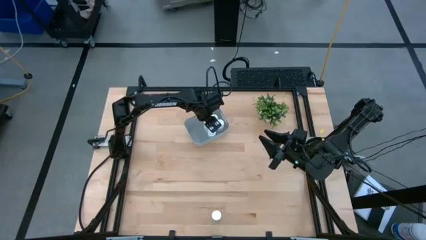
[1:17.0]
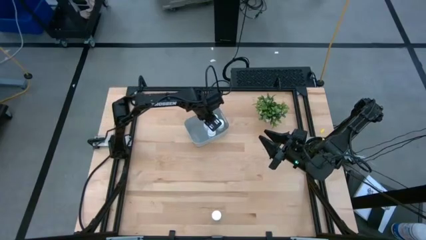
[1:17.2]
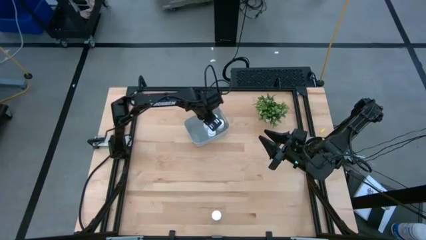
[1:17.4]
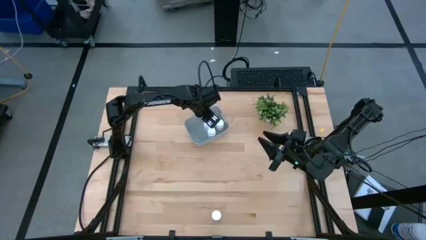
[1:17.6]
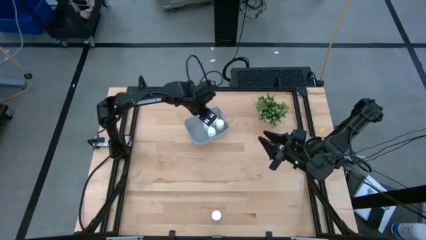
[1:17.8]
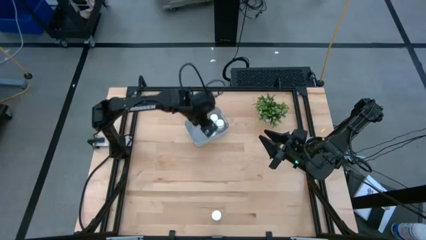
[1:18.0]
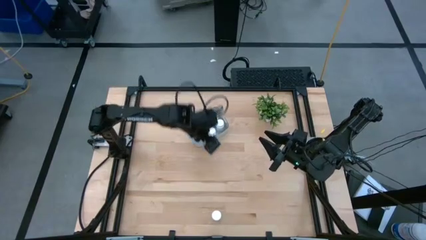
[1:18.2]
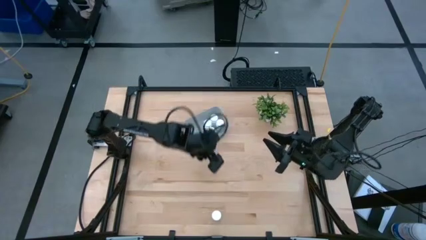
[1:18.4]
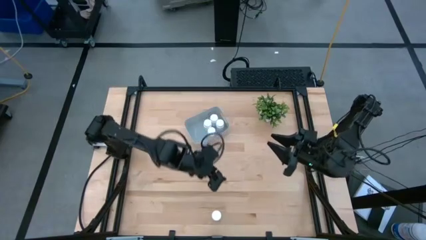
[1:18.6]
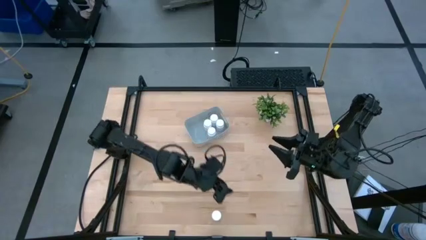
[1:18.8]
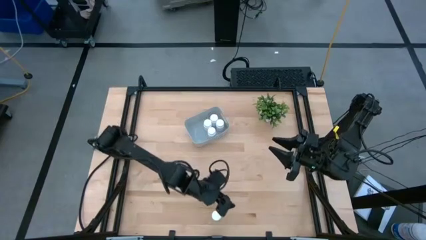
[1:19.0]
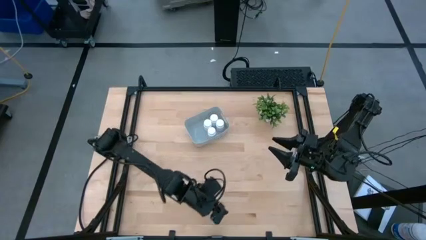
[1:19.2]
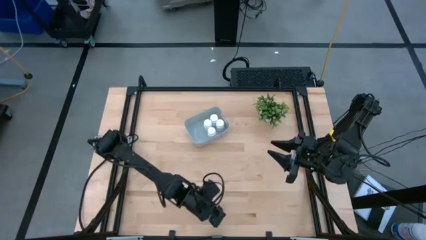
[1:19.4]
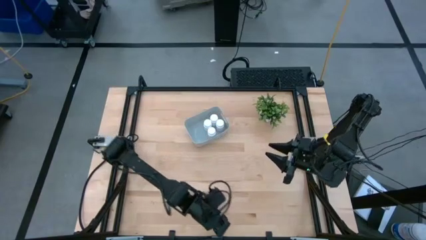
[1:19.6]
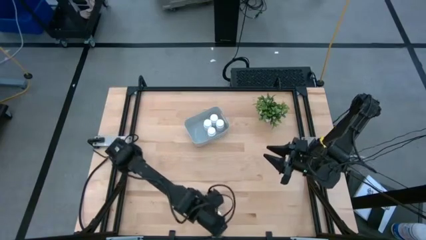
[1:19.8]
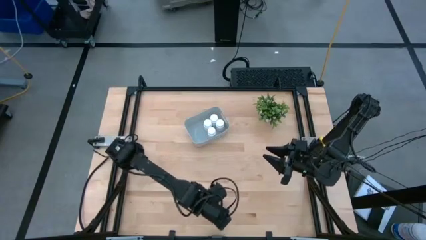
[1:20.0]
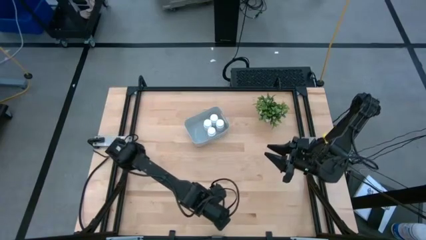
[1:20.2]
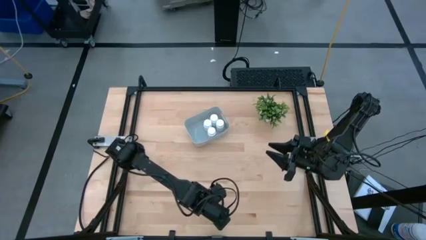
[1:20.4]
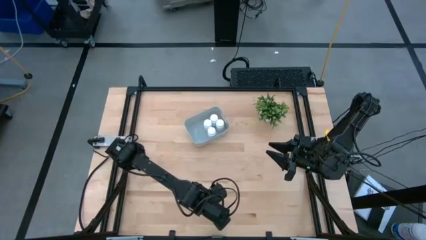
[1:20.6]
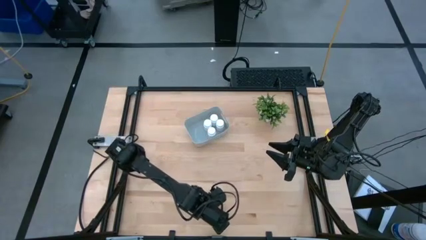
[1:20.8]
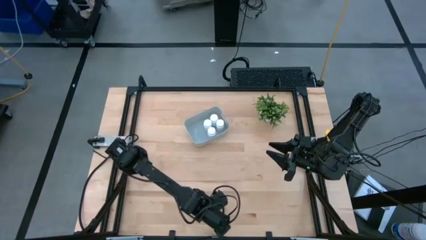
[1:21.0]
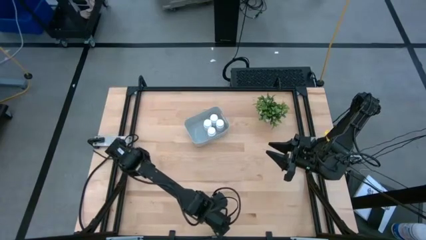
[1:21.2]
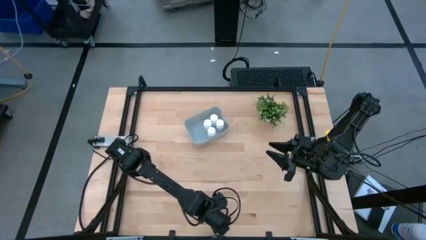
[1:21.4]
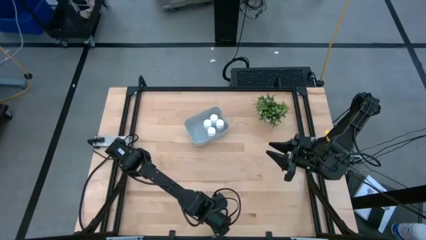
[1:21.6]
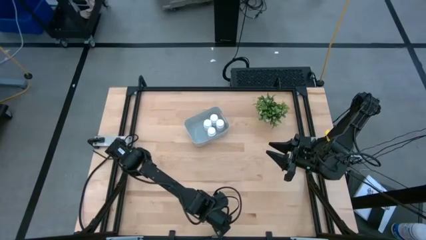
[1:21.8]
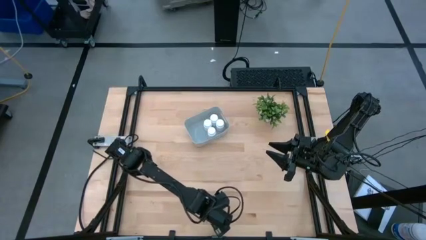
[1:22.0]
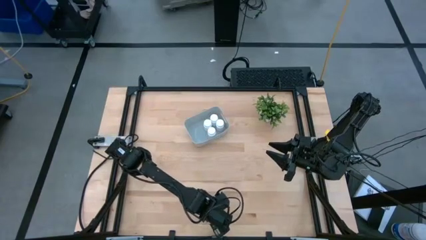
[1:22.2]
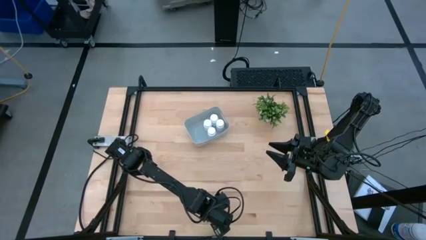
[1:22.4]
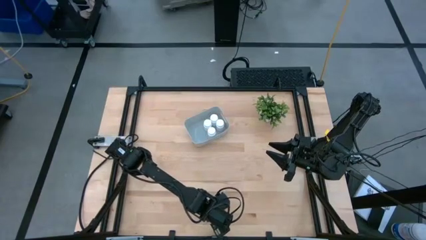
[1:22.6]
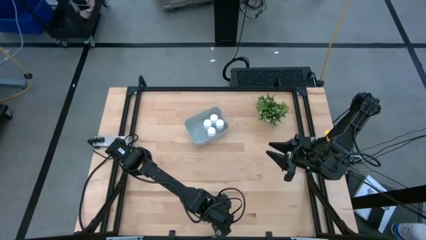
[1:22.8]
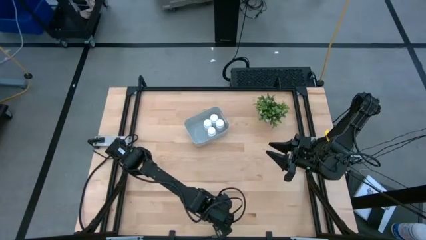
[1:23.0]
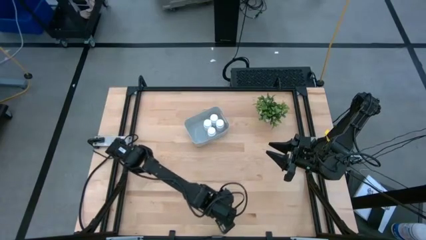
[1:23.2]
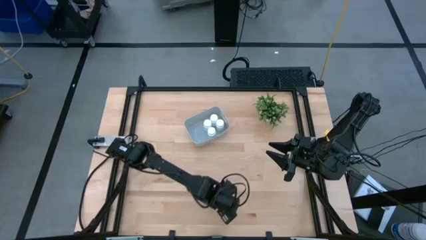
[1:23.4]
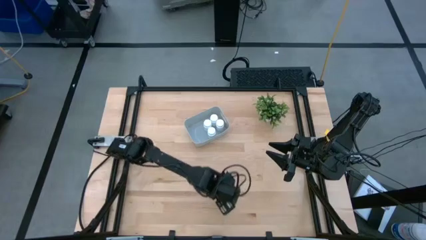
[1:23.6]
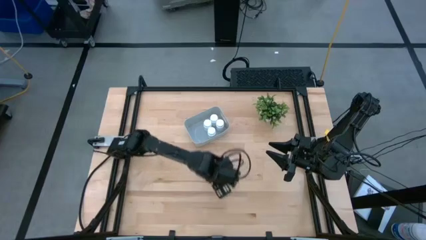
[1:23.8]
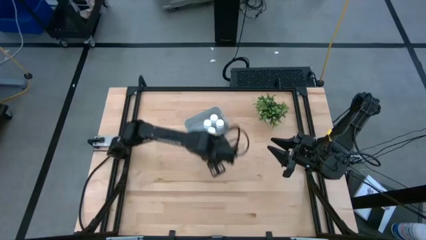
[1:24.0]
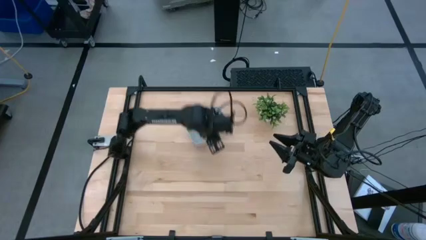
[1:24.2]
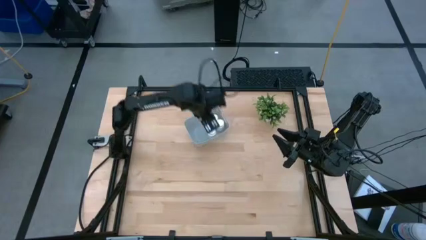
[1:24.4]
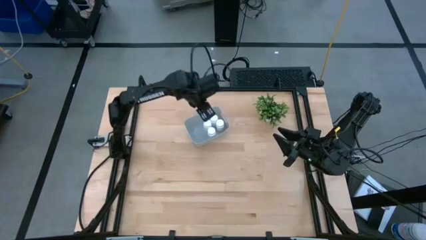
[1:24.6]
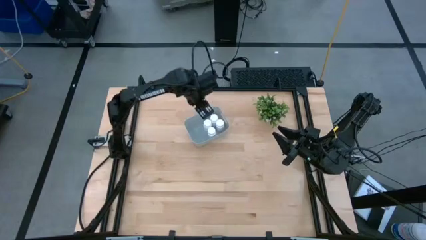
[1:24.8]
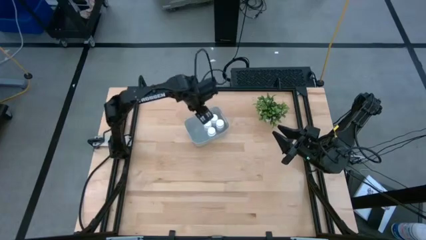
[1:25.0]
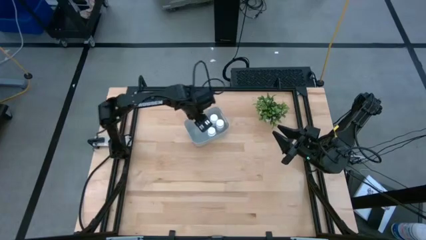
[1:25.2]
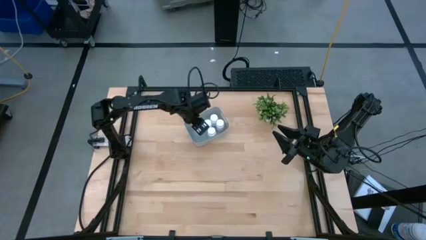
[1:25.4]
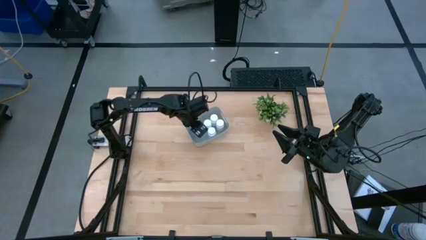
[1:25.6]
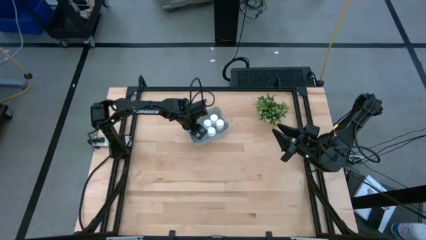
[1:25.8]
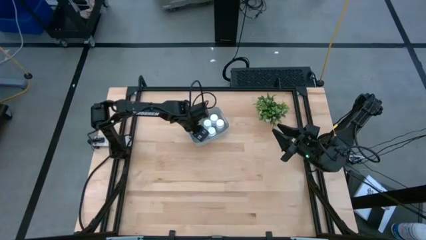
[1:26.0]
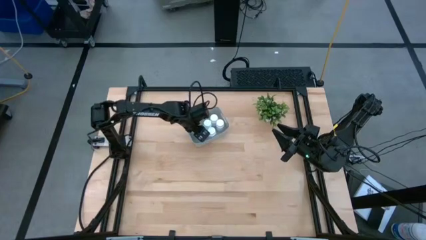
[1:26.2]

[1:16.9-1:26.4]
Task: Pick and place pill bottles into a basket
Put the white pill bottle into the gray bin

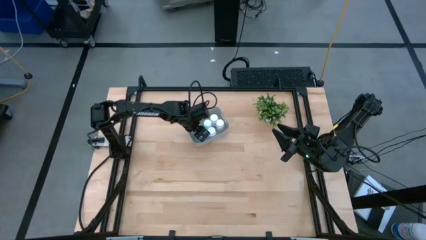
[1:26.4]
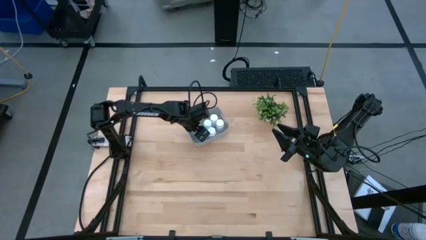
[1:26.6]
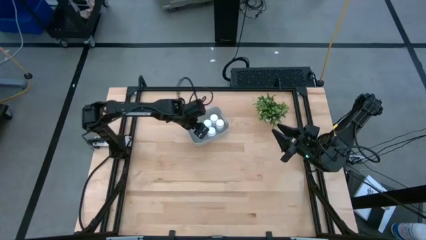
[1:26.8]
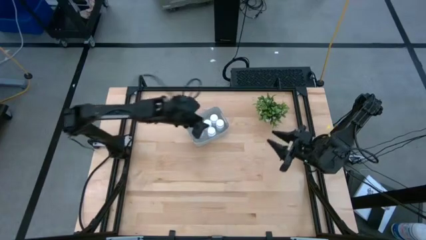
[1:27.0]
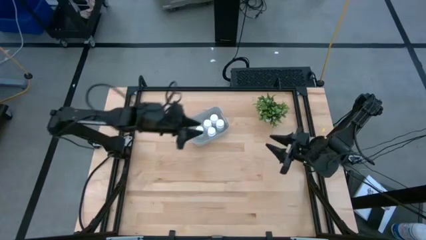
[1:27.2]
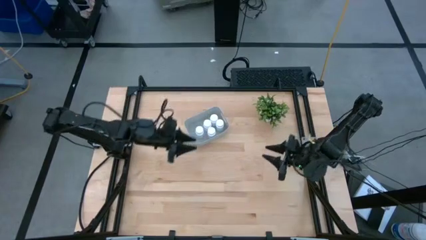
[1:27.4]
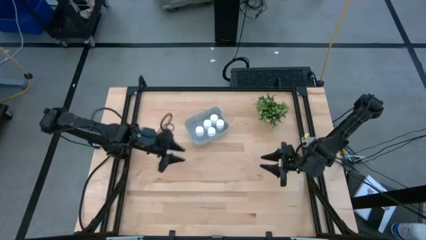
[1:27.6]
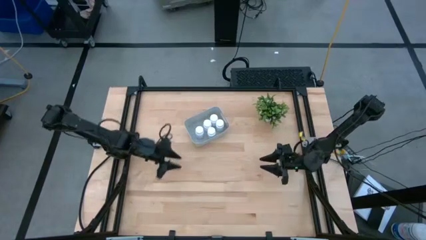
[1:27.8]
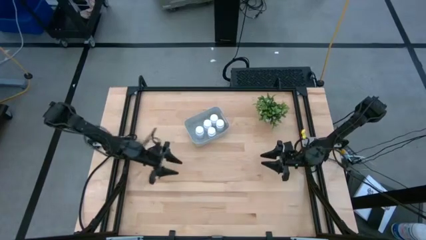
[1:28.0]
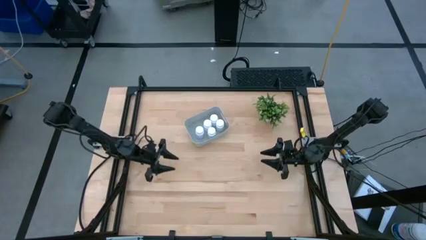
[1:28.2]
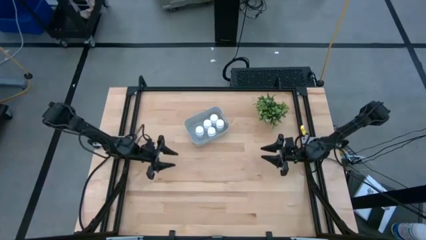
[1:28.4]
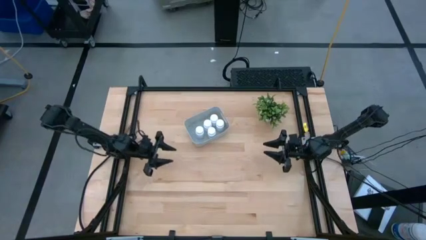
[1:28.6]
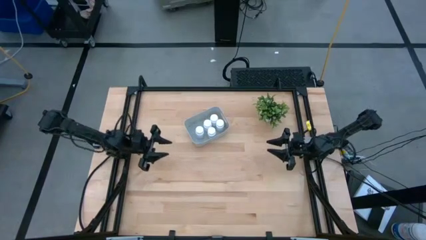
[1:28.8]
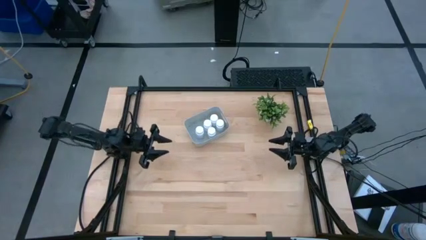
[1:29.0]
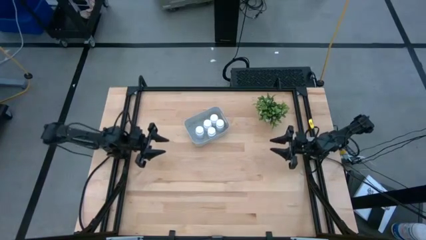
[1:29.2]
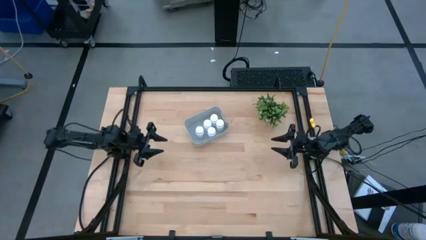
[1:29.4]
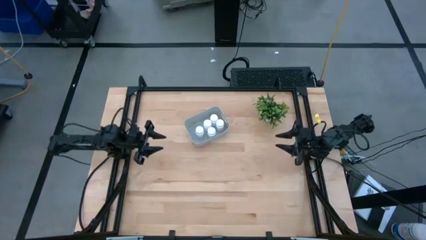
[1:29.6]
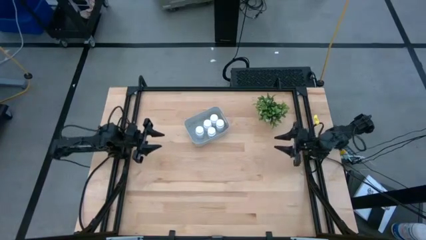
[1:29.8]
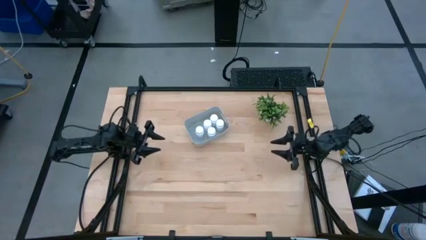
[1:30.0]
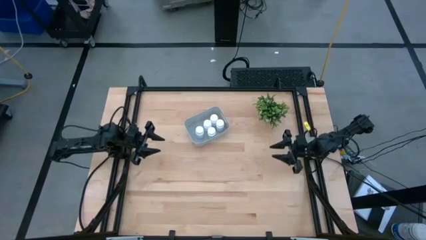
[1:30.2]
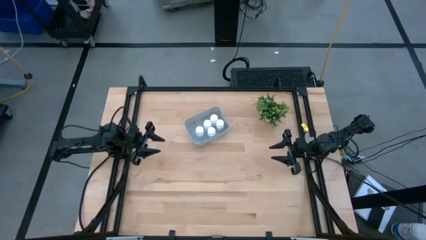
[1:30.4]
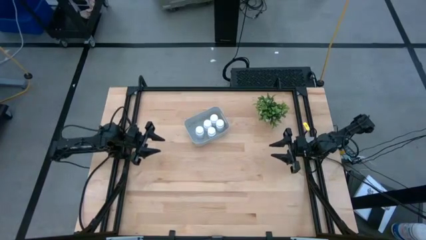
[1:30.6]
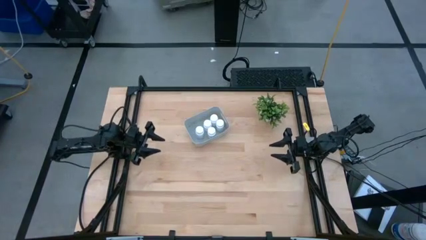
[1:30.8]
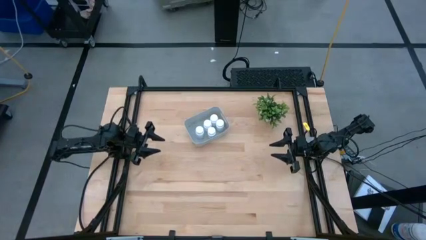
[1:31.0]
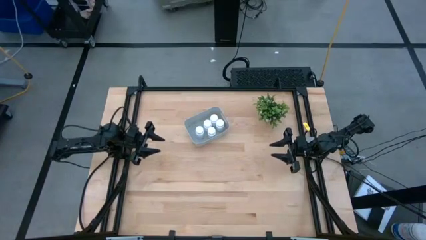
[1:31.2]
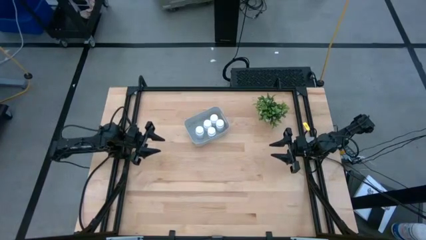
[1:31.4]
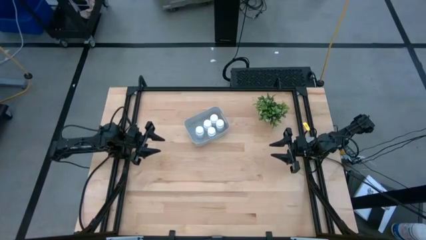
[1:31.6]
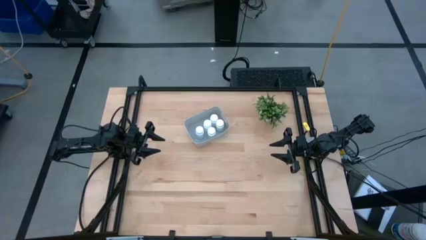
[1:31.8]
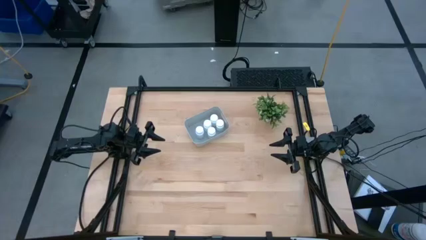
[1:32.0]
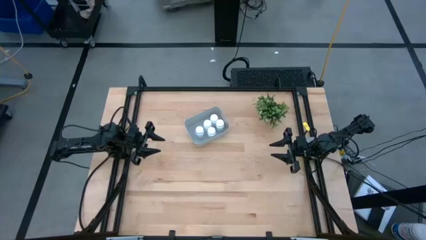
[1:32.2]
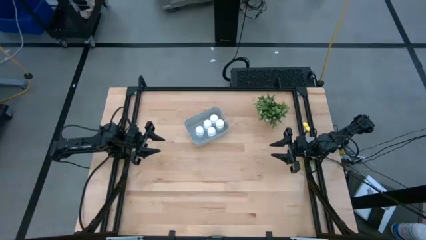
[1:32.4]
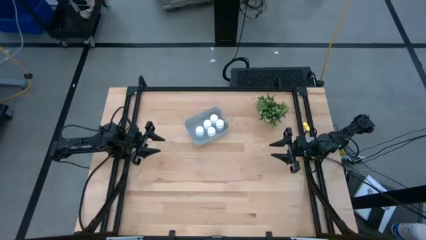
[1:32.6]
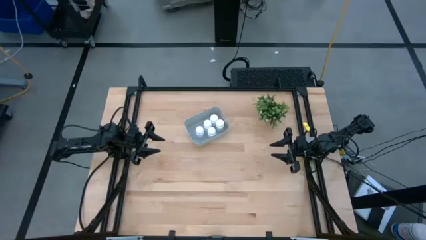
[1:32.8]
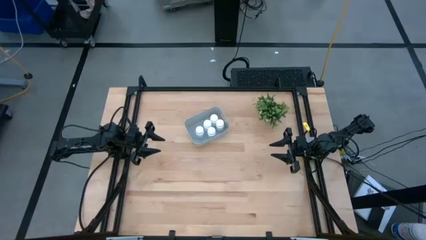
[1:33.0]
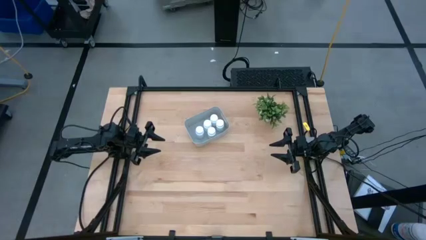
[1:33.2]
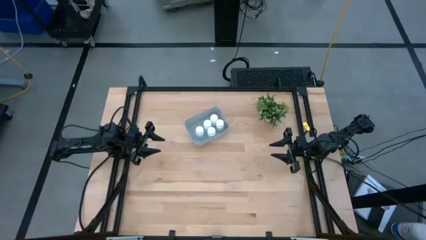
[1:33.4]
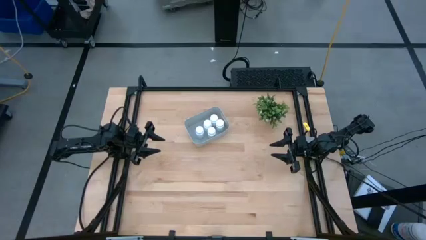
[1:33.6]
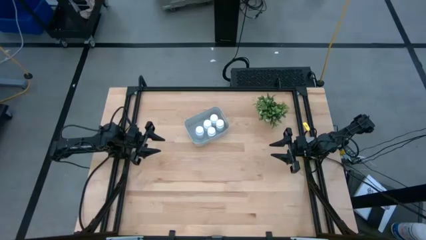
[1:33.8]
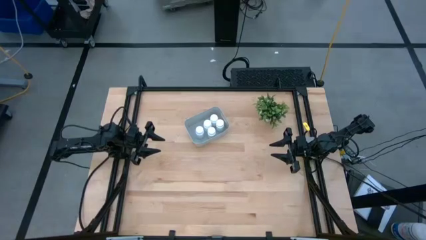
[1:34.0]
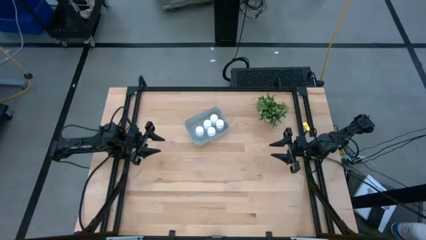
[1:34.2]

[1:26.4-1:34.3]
Return to Home Position
